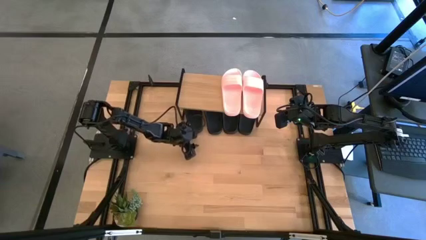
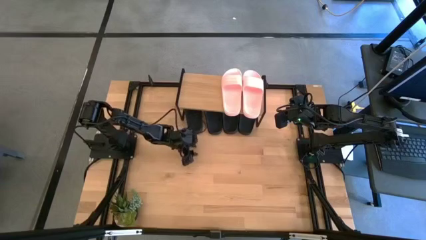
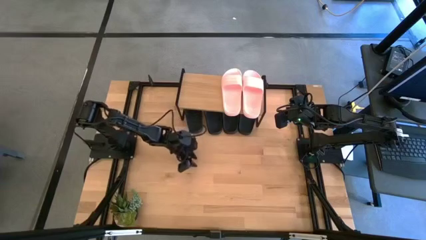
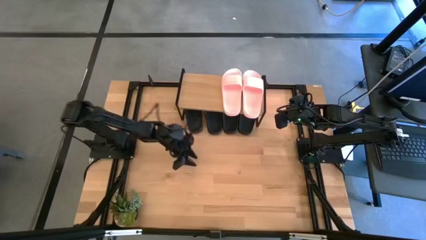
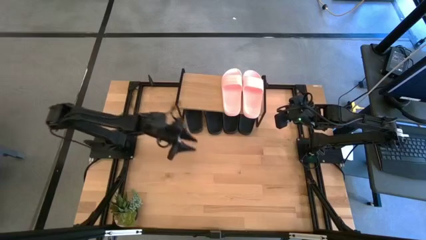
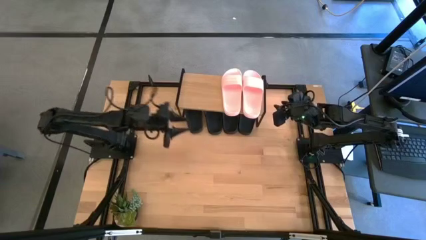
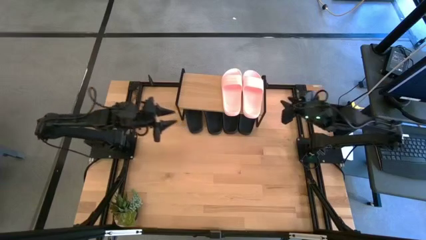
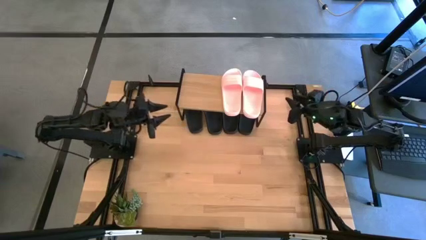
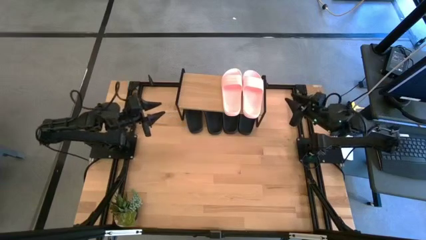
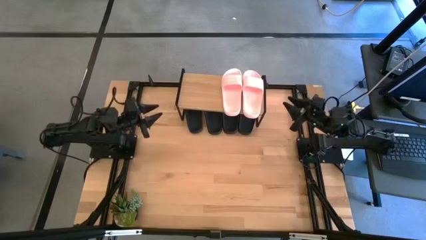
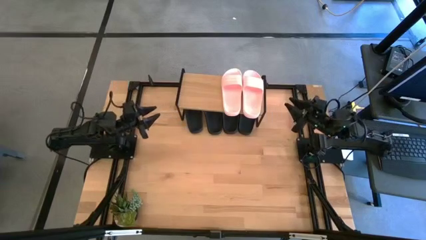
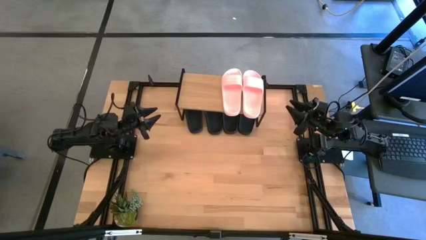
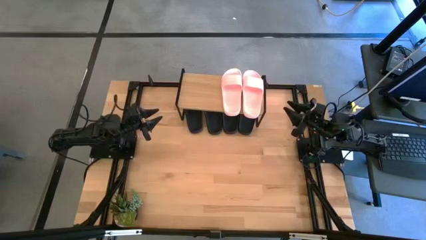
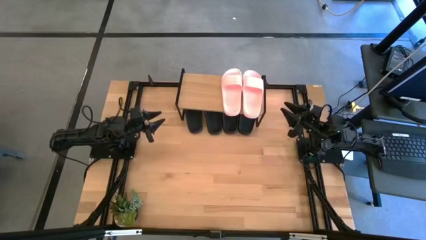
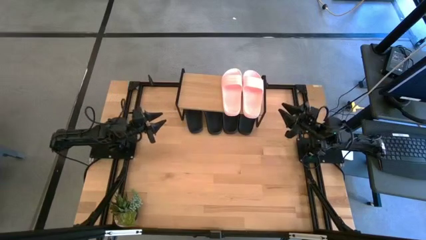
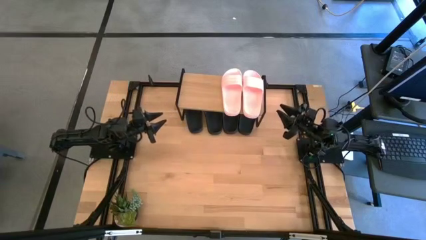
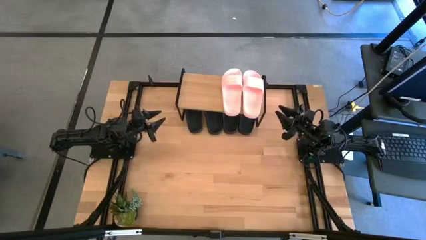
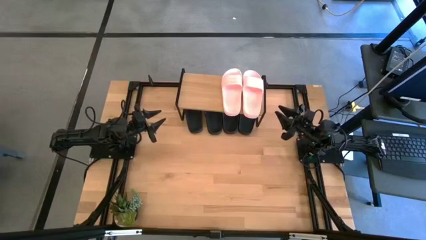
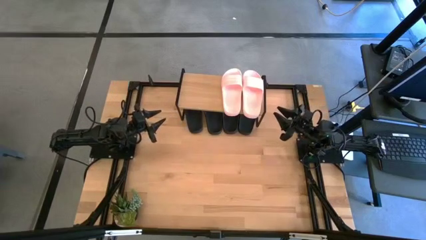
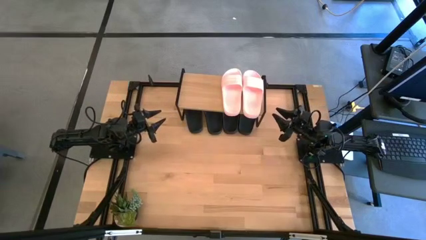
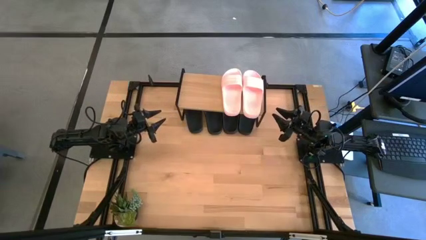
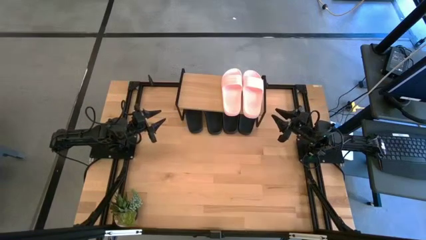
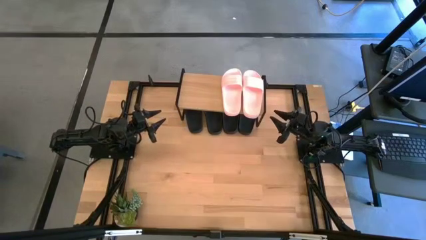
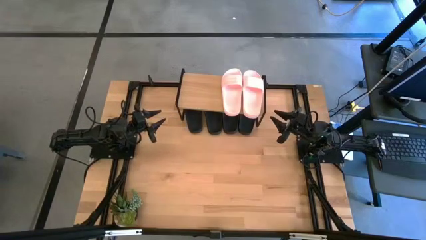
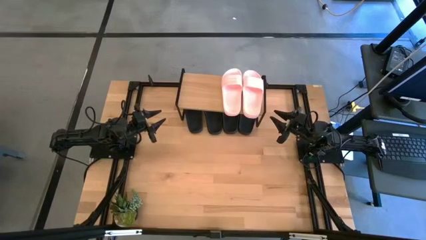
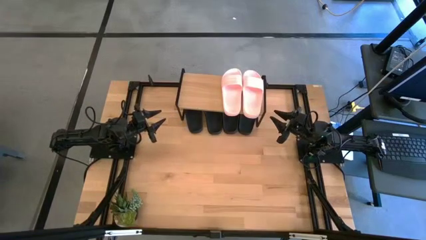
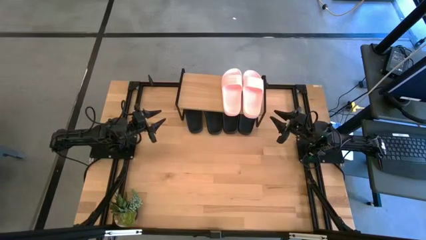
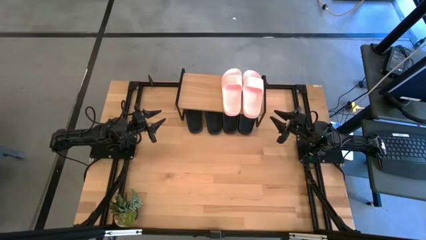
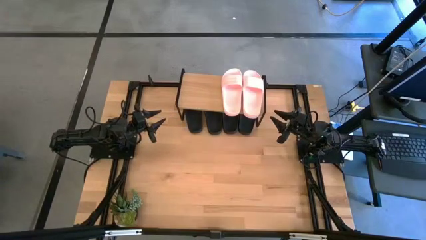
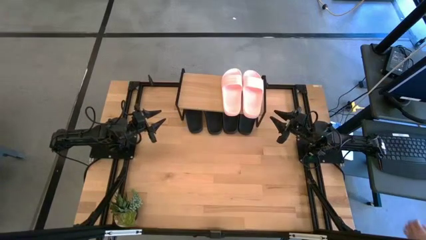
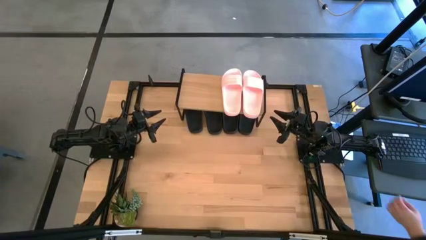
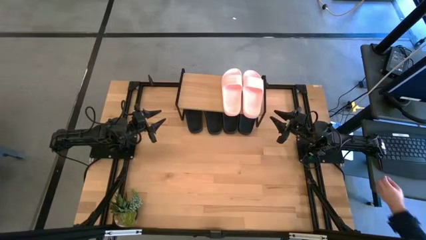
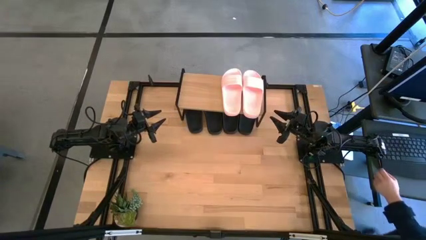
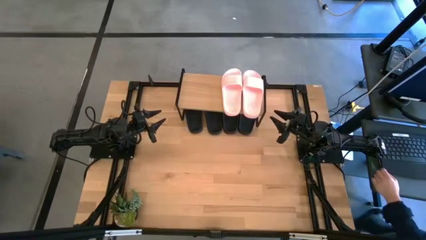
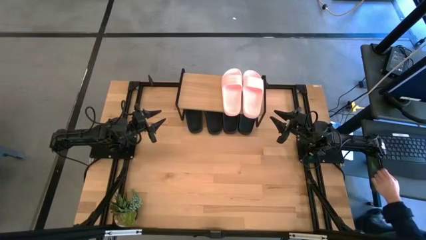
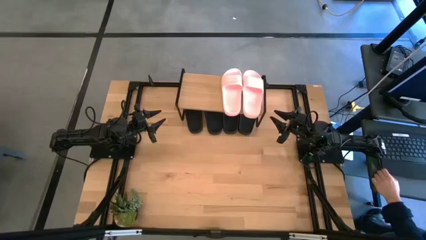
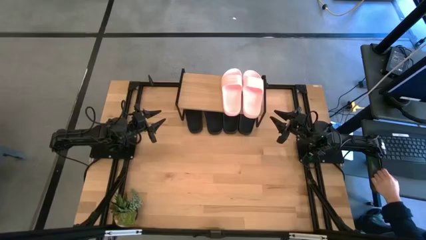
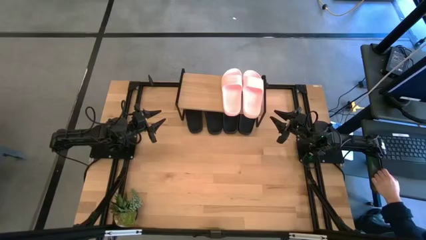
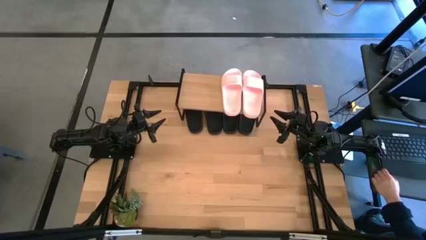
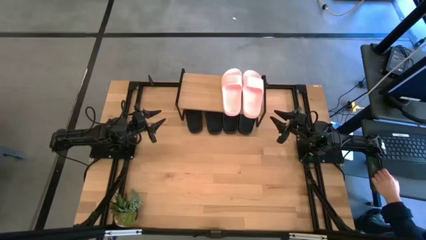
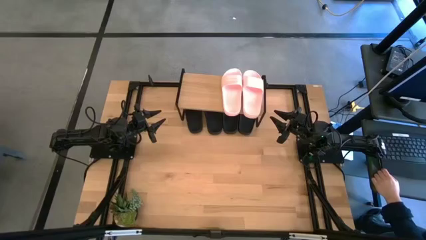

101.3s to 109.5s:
Task: Pick and place slides into the shelf
Return to Home Position

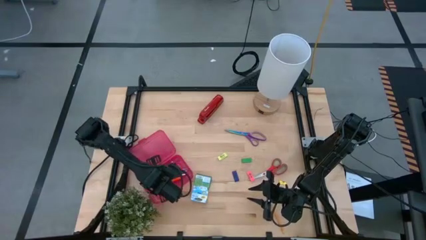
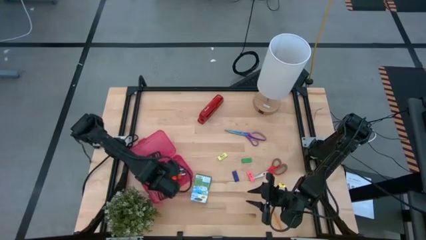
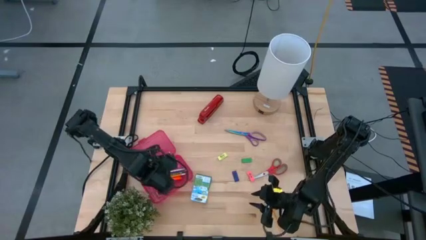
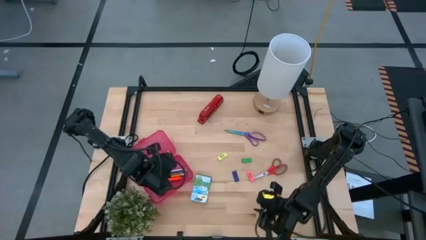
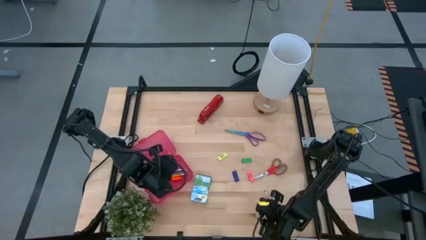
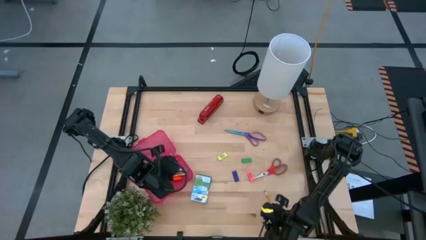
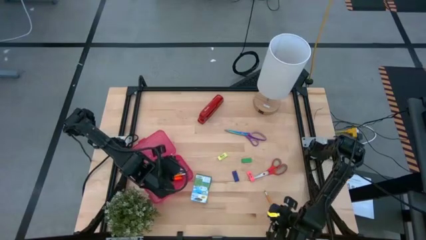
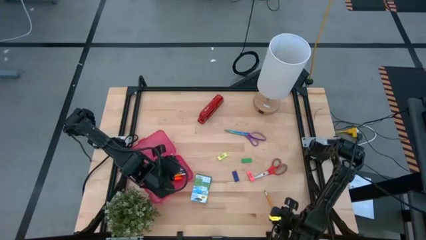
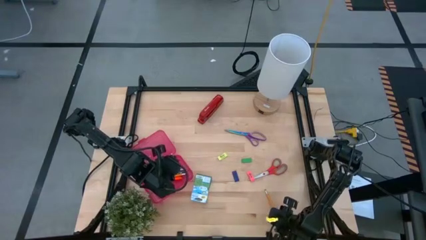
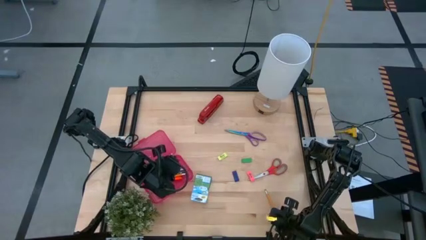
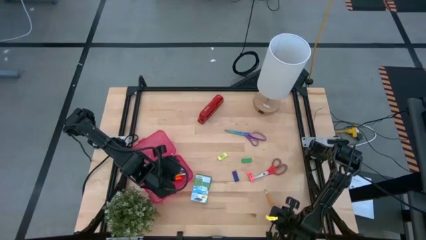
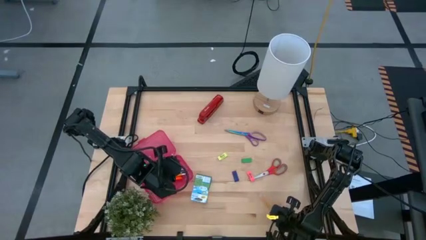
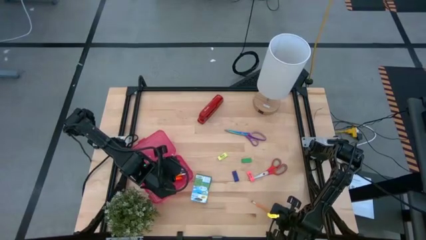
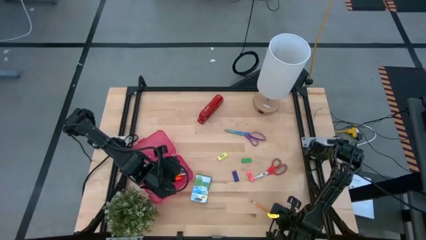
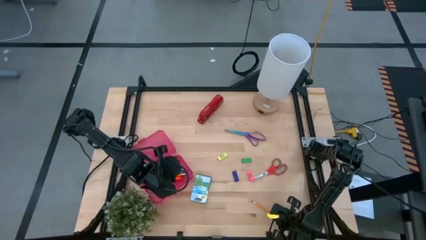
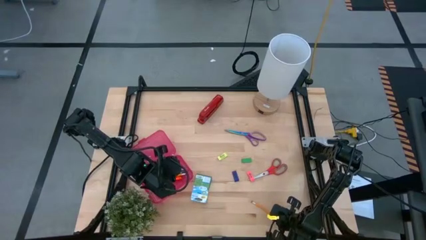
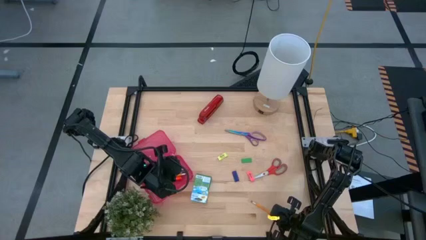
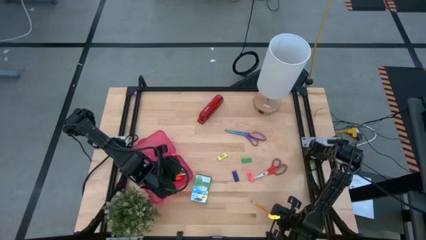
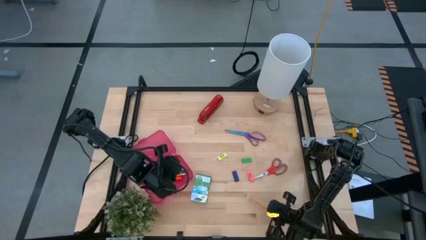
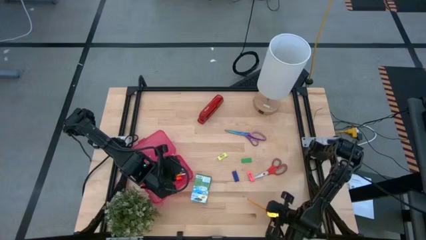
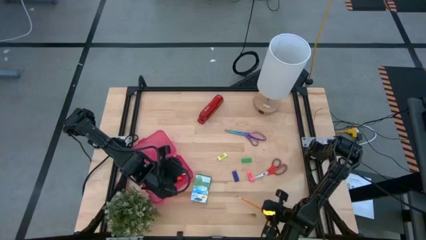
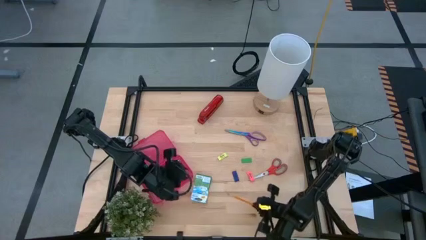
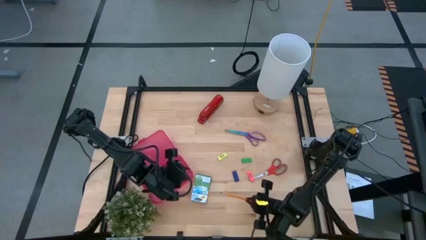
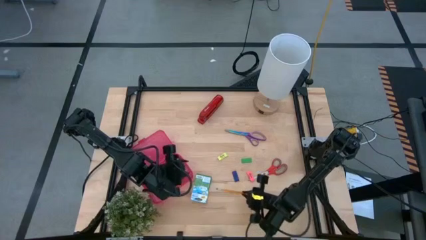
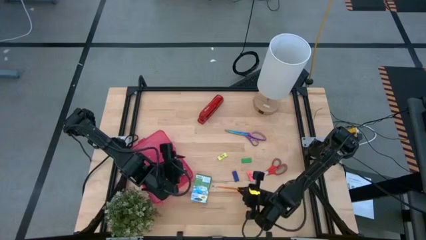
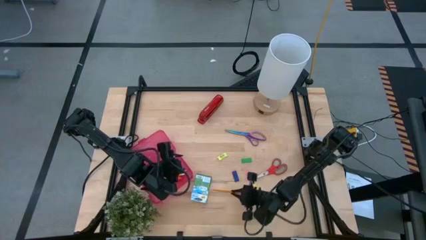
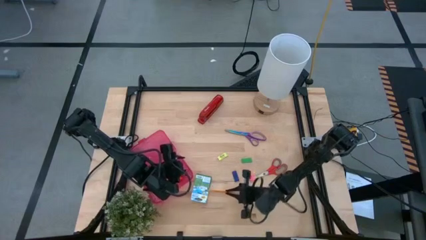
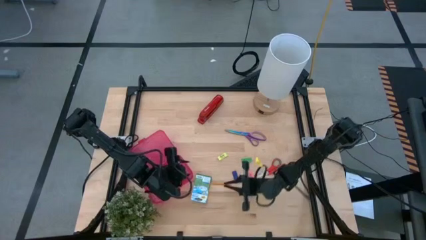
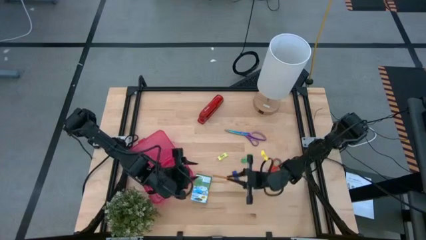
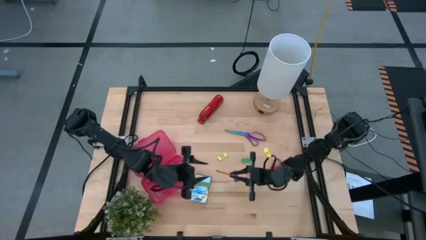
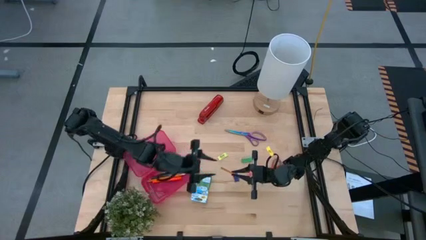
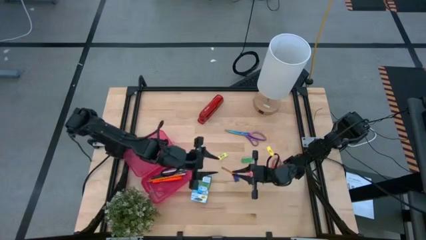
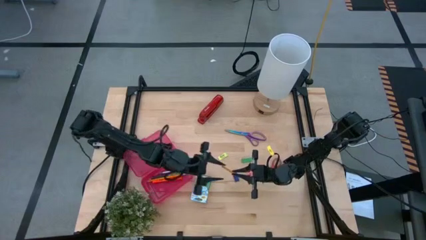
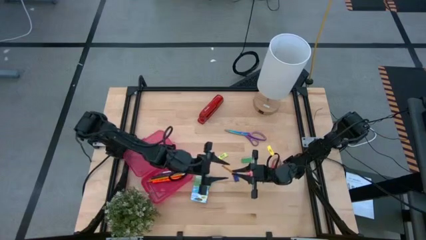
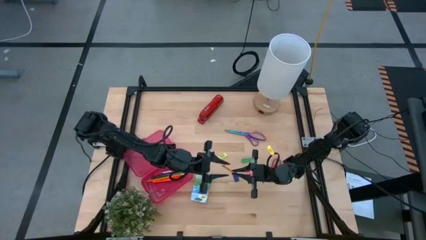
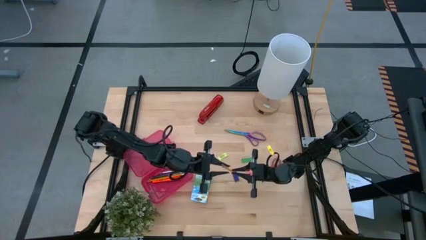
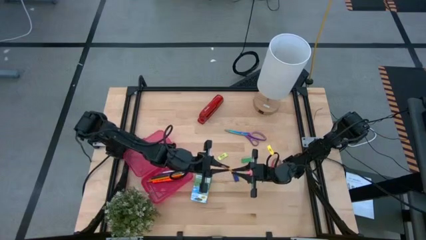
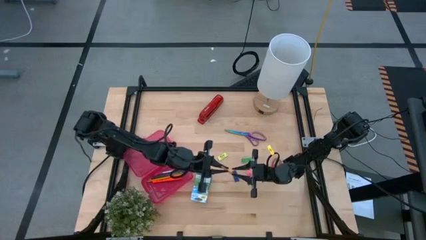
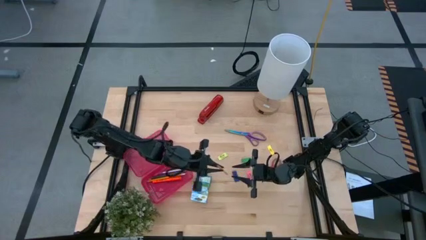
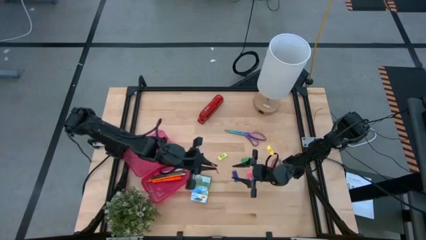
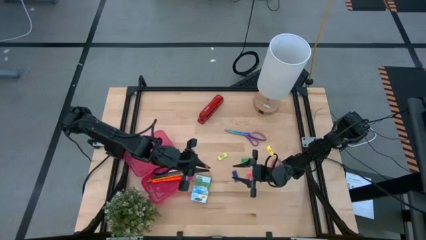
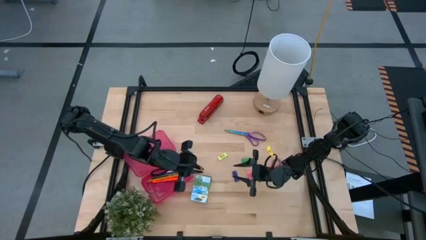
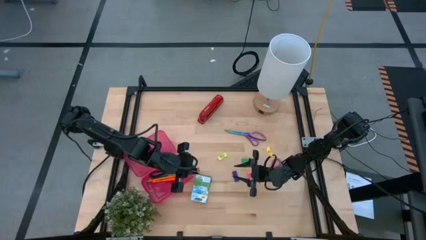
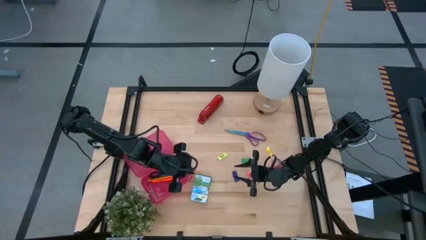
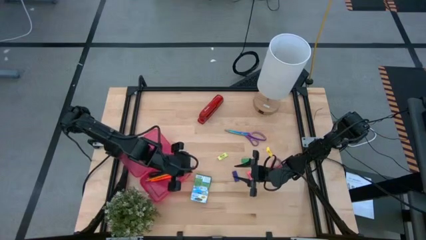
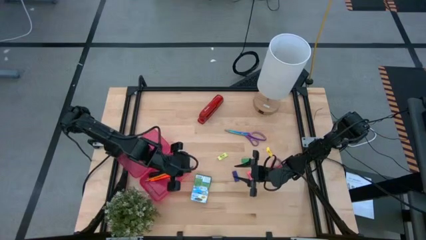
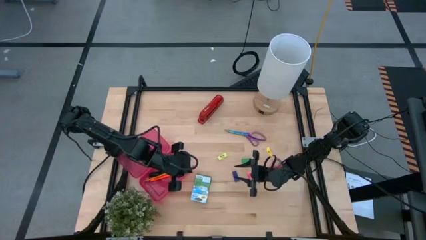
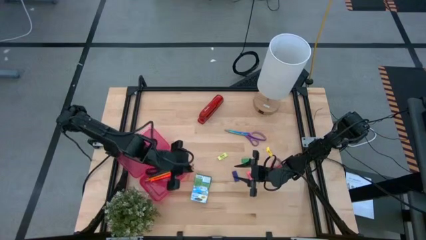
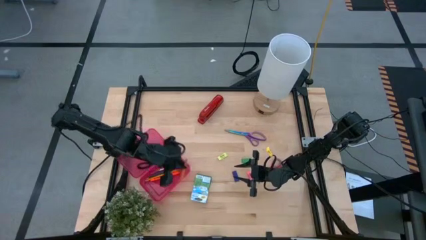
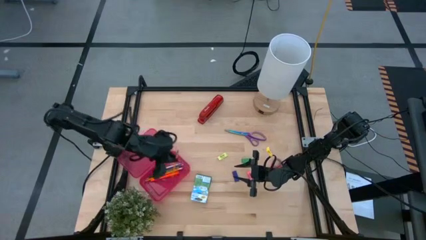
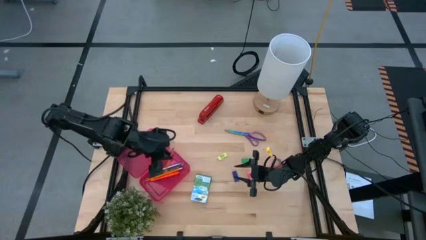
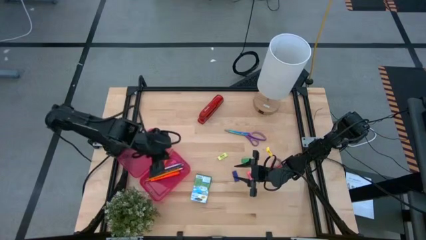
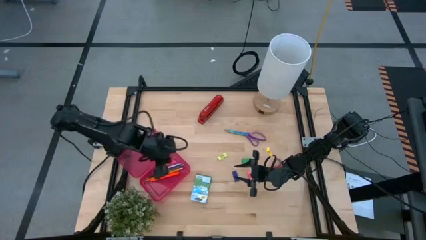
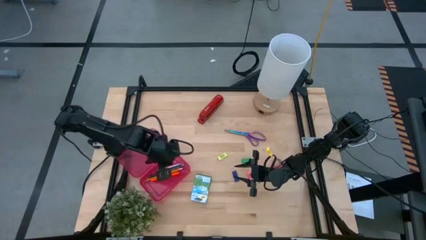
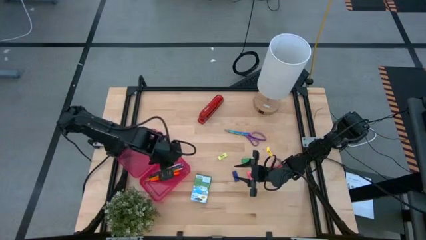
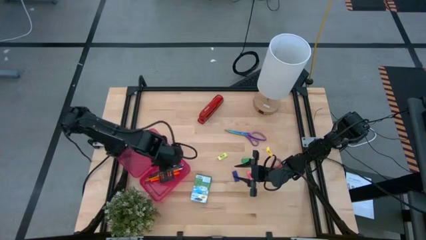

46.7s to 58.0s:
Task: Pack school essentials
Put the orange pencil into the red supply box
